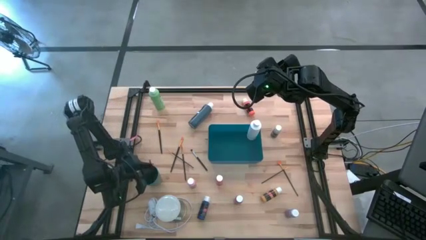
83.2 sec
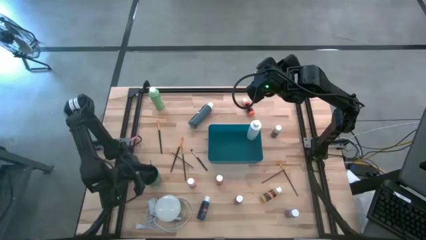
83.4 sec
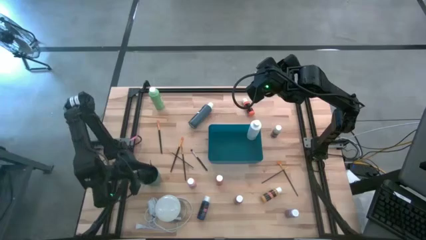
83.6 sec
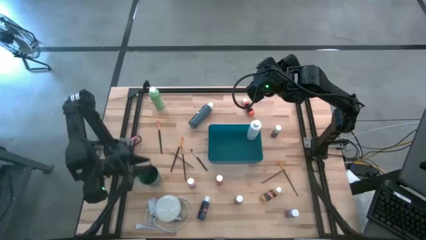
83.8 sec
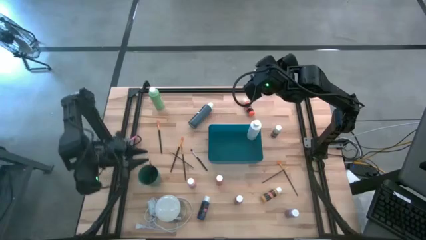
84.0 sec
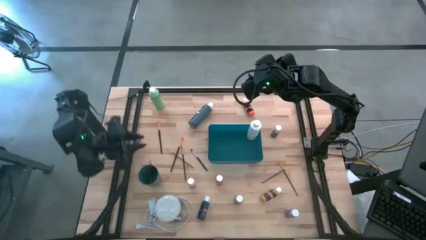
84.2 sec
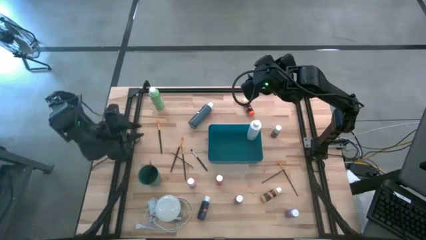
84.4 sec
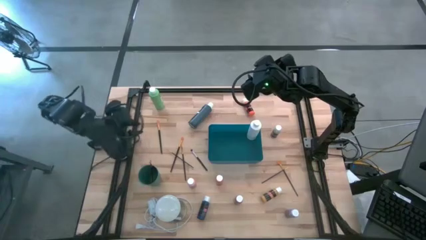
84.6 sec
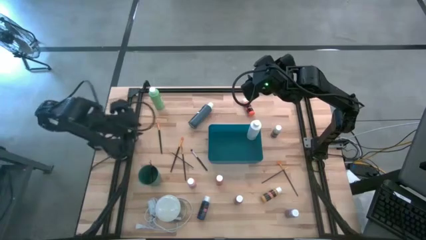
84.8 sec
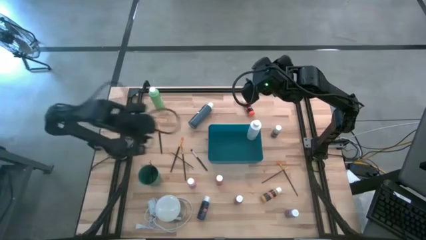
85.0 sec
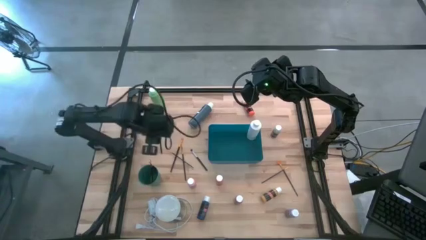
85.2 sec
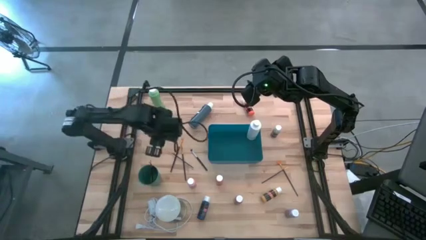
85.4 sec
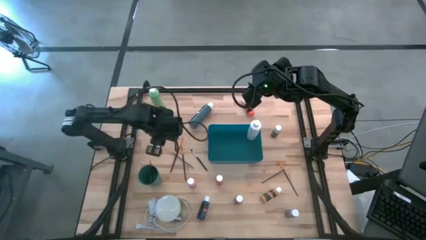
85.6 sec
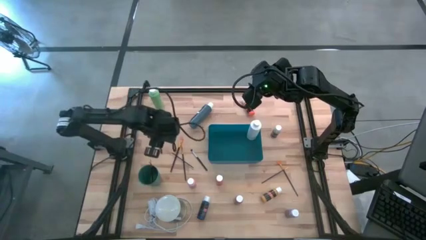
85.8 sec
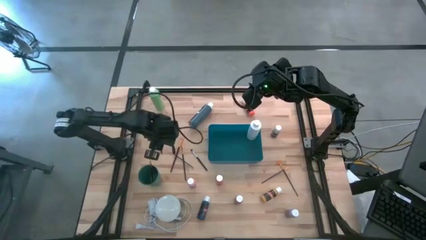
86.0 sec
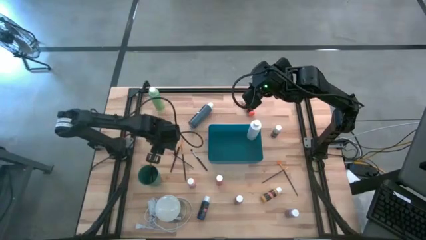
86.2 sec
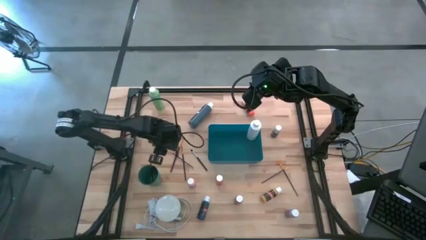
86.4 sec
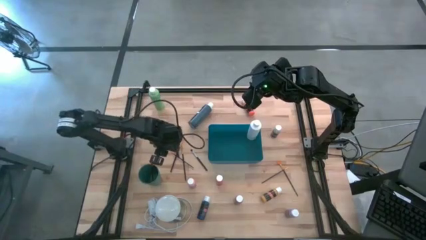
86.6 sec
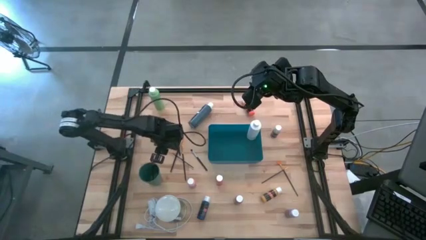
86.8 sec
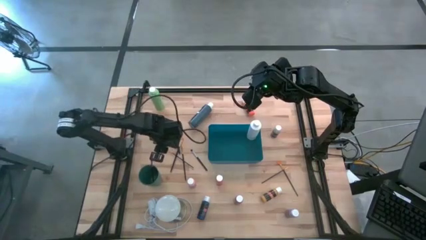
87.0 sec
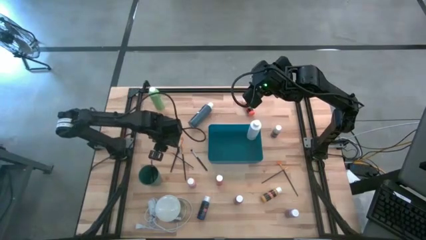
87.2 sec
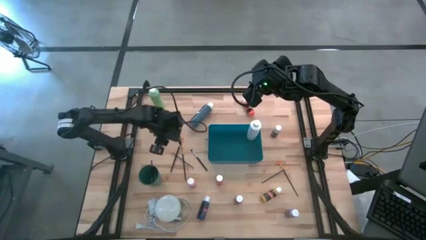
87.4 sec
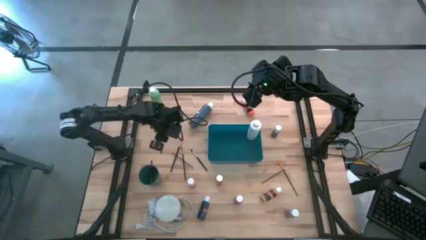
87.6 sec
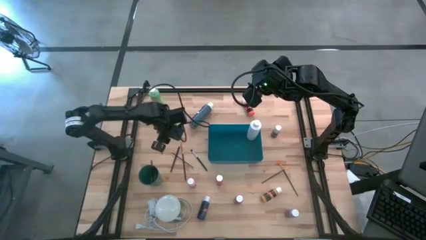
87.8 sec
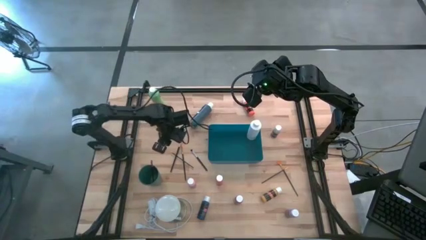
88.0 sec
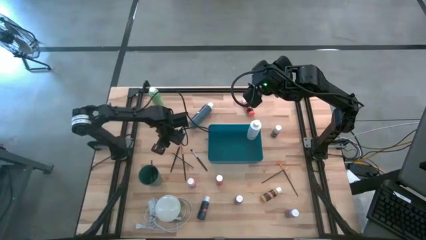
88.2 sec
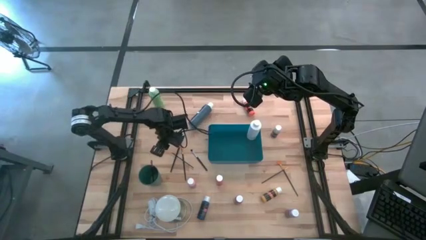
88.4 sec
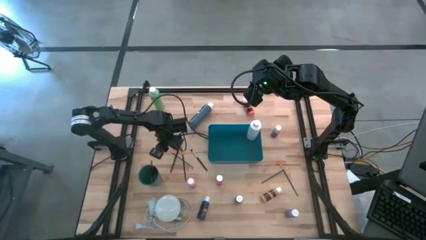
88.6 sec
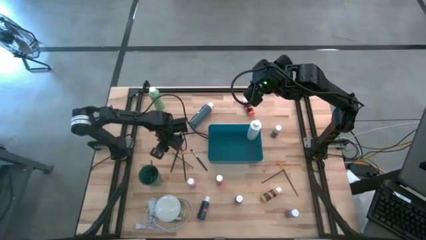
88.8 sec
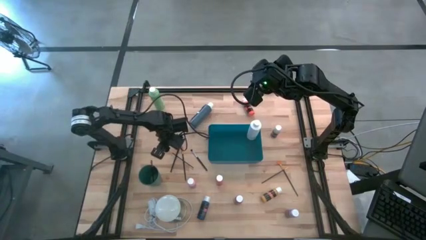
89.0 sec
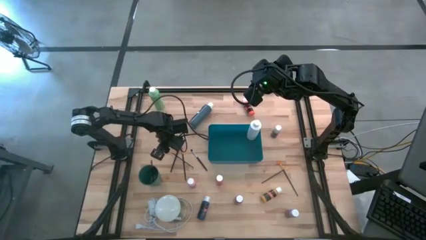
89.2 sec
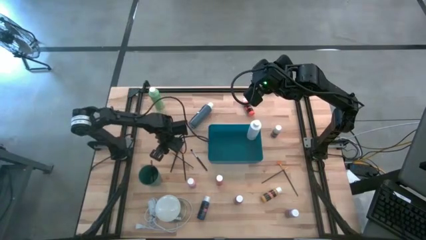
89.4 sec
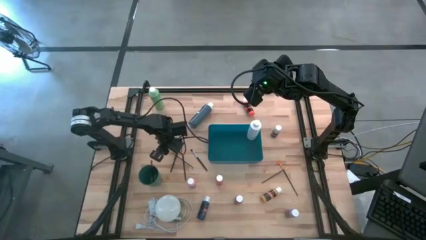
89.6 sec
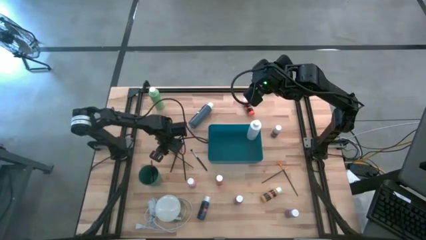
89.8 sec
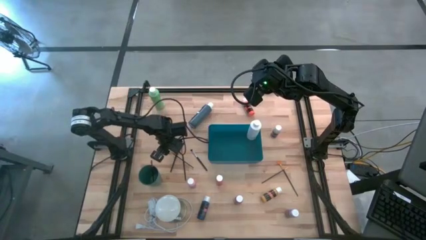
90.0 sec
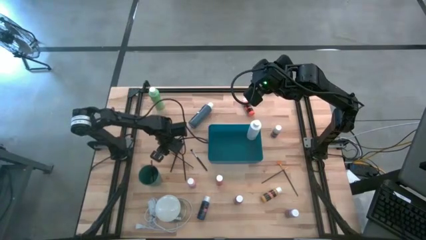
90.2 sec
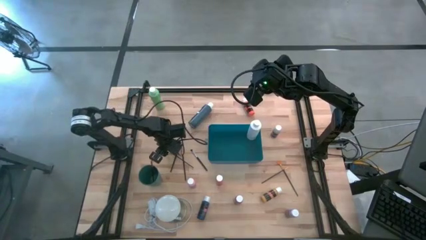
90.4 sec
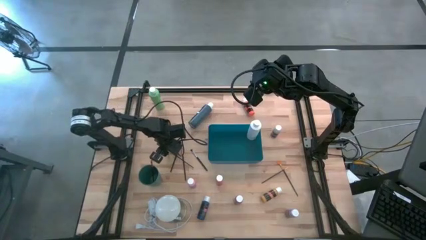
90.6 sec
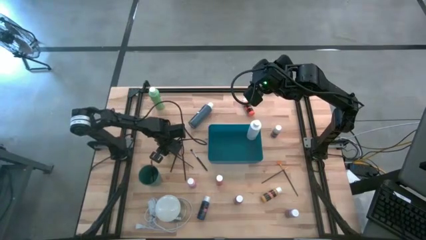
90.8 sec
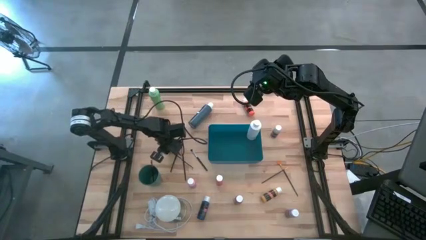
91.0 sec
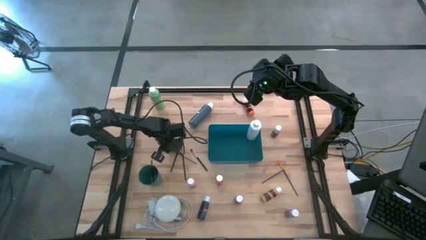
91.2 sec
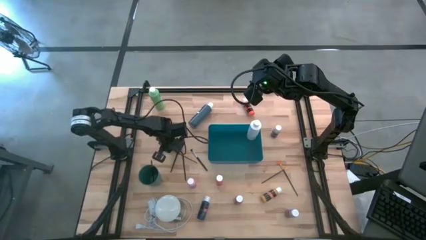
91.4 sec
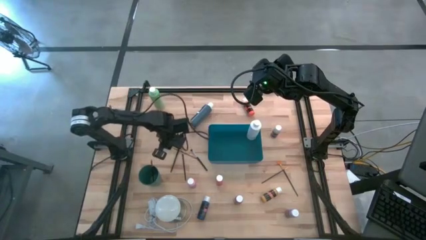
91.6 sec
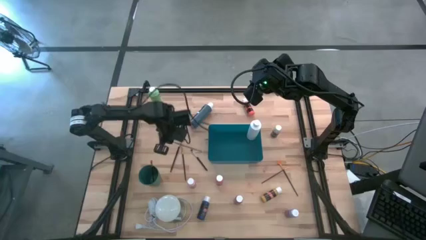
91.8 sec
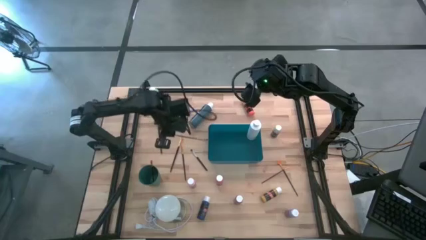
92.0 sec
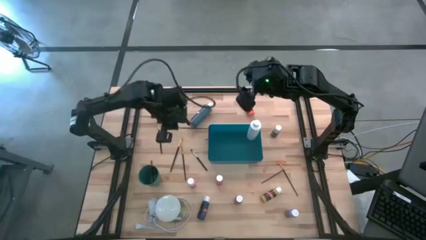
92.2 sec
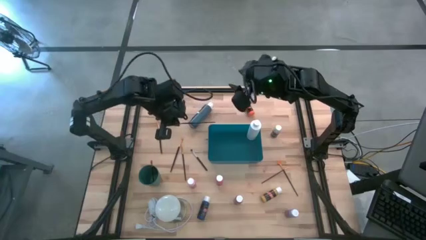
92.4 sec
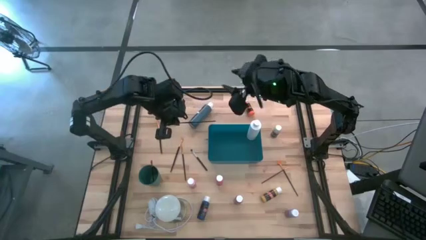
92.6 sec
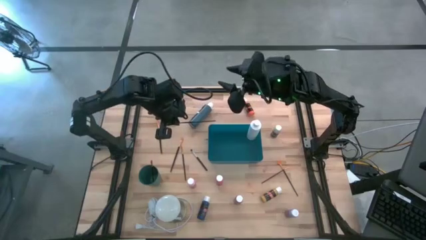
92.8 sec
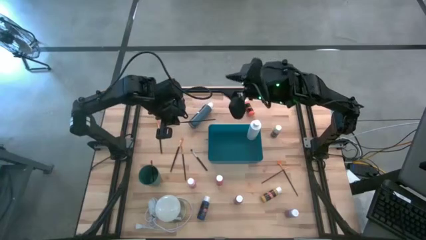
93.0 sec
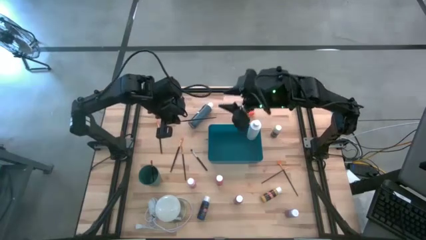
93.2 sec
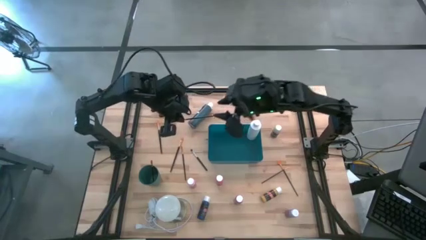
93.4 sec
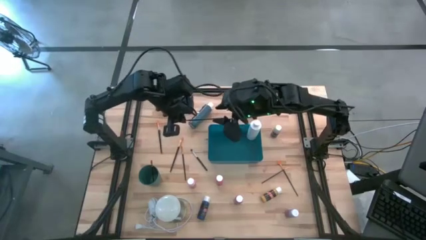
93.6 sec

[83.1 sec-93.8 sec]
Task: Pick & Place Paint Supplies
Put the gold paintbrush into the green cup

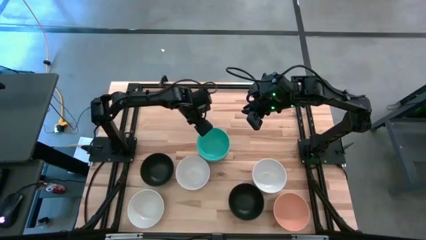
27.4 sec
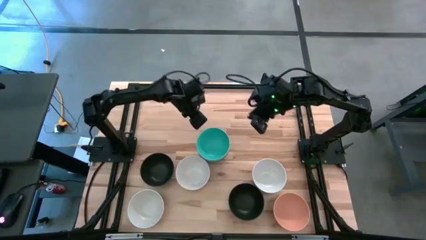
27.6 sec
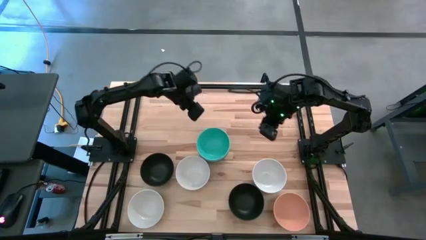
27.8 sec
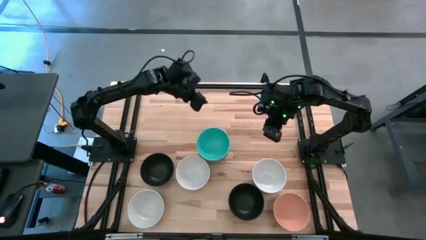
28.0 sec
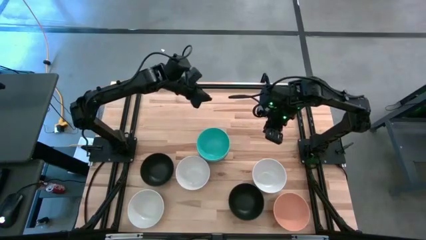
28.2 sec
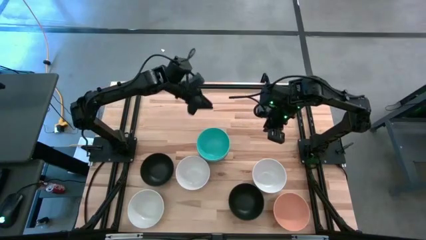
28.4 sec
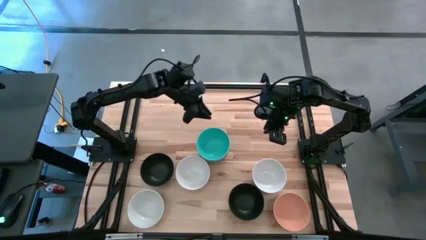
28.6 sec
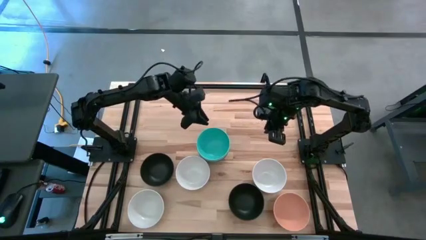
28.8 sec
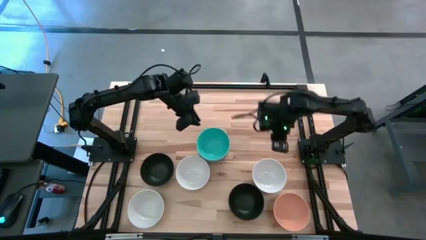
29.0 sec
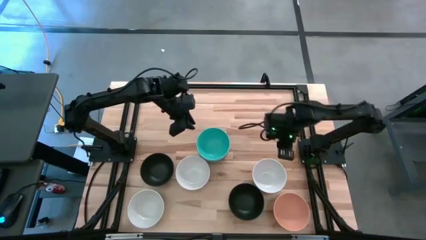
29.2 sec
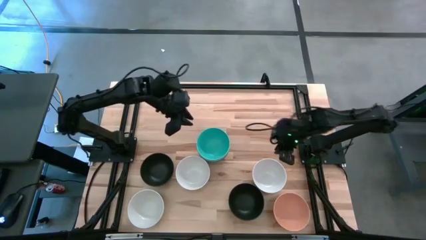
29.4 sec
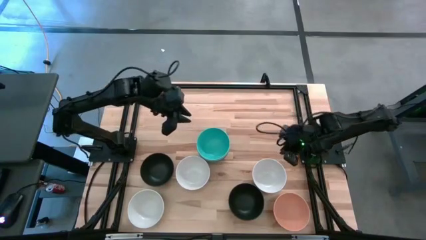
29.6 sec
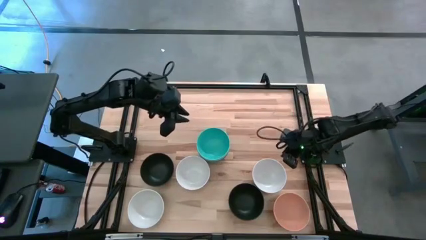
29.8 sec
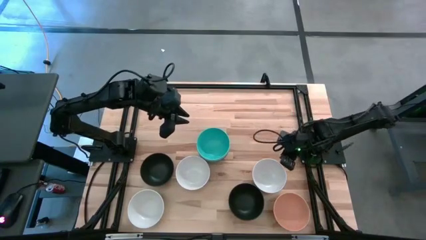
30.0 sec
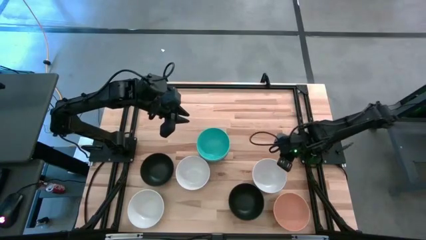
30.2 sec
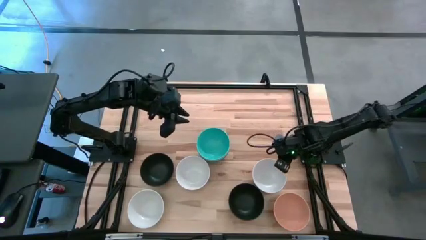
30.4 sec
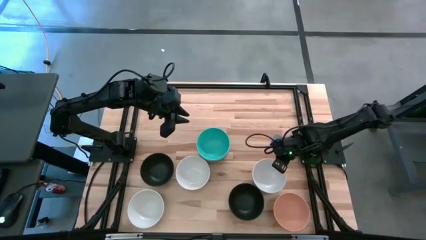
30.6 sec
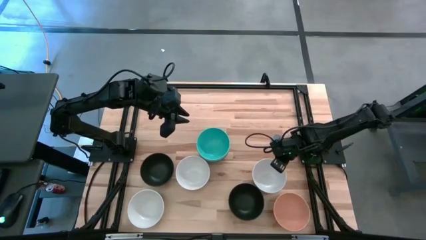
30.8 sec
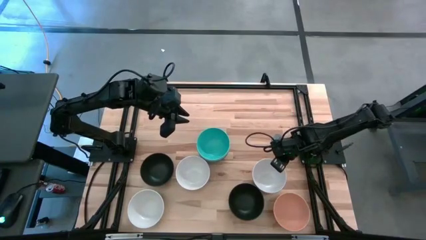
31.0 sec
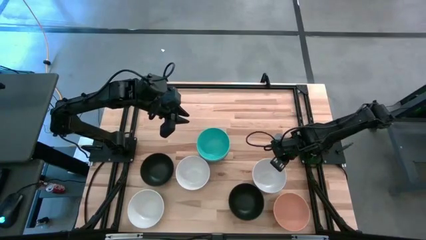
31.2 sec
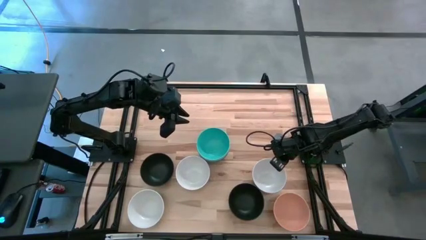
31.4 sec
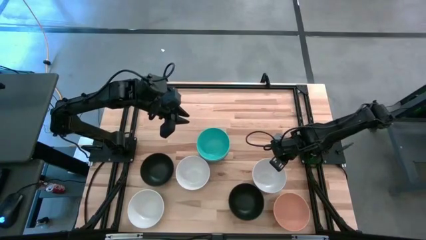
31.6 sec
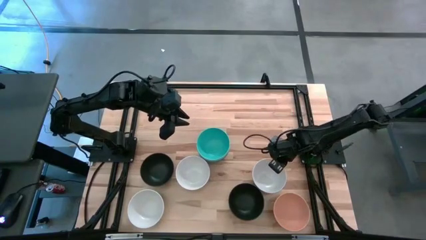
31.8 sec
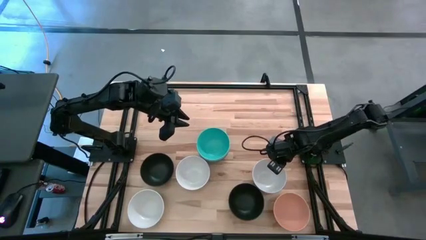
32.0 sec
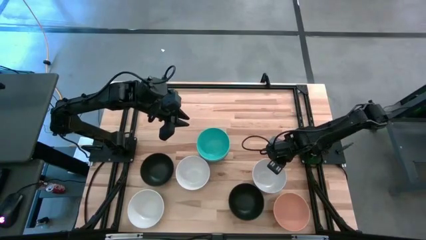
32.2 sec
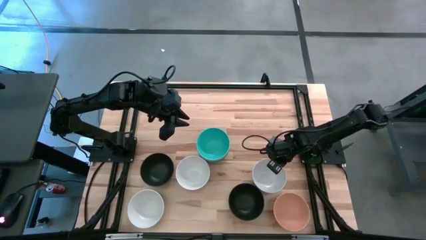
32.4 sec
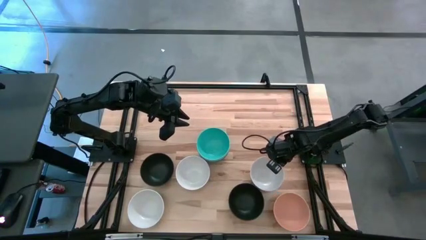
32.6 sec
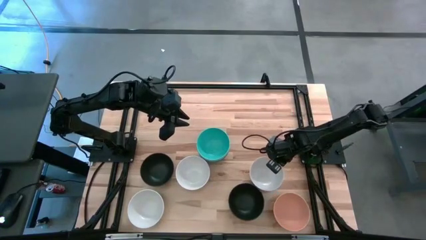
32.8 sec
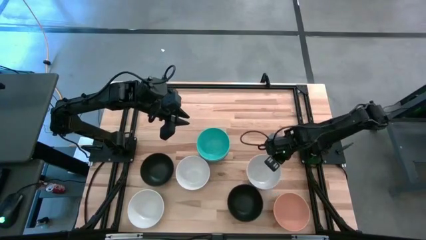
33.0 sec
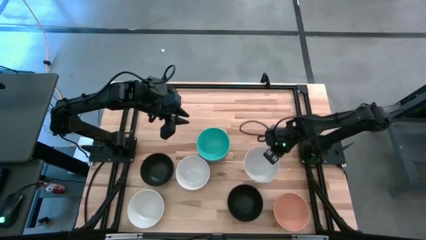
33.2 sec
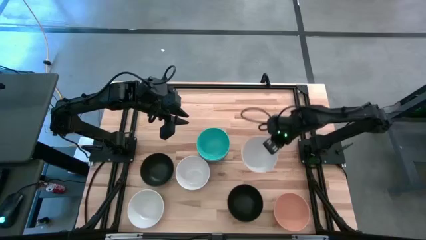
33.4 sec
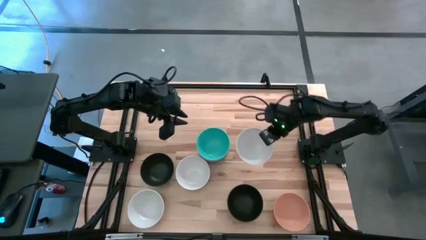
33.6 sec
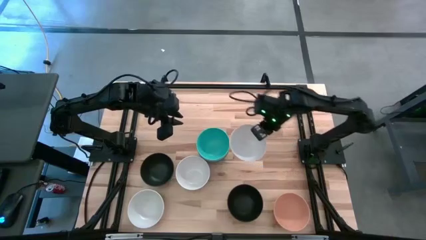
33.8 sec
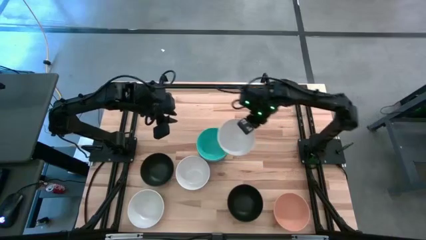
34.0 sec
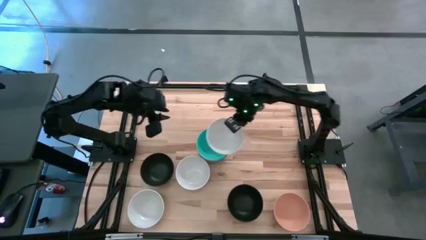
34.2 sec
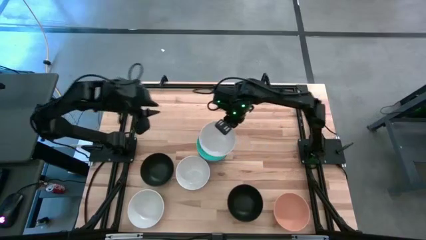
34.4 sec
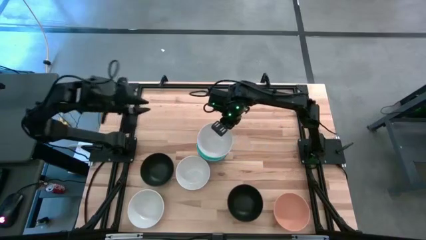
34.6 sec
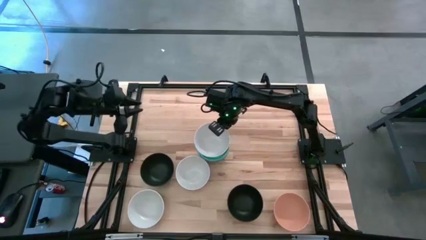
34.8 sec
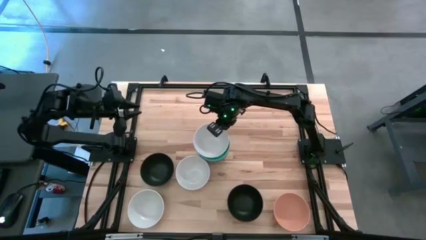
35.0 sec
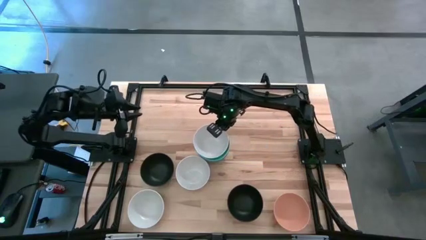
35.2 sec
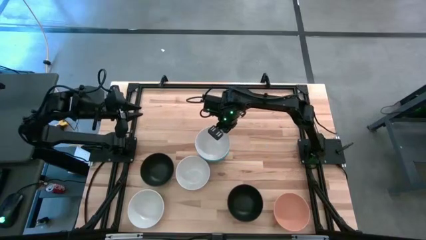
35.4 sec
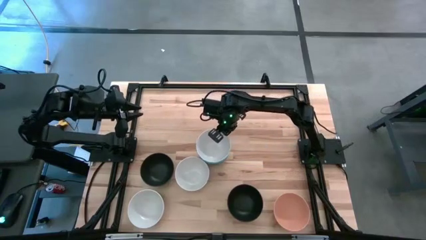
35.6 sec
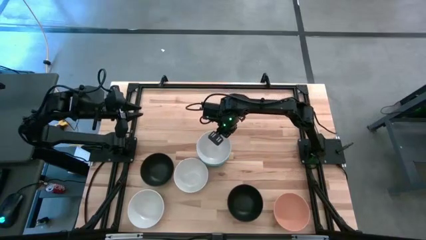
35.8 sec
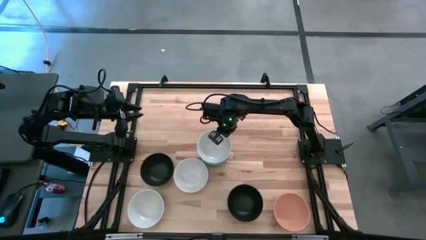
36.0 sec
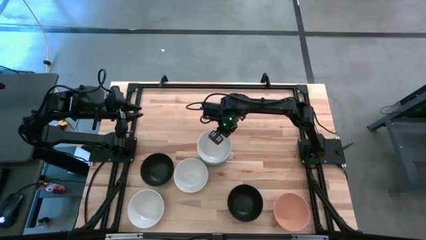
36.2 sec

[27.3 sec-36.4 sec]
Task: Nest bowls inside each other
Stack the top right white bowl on the blue bowl
